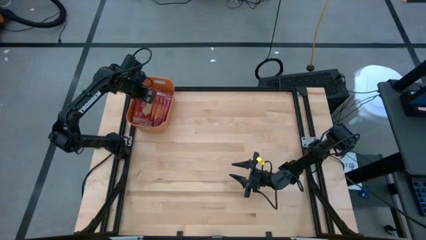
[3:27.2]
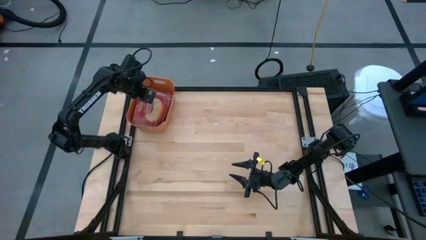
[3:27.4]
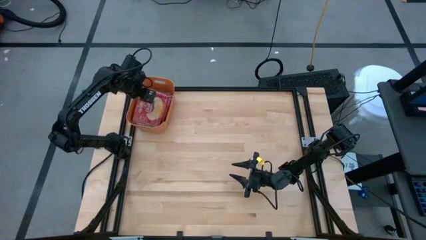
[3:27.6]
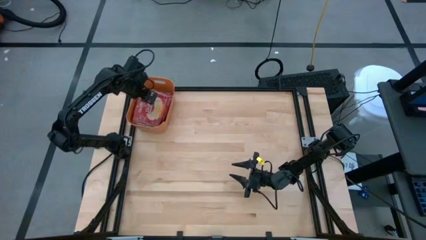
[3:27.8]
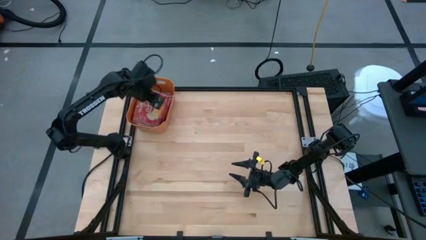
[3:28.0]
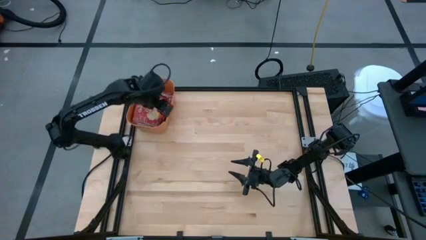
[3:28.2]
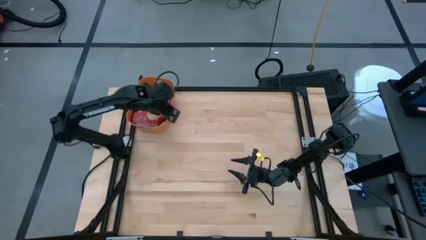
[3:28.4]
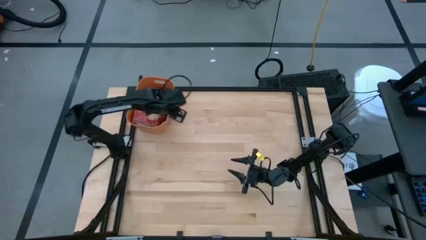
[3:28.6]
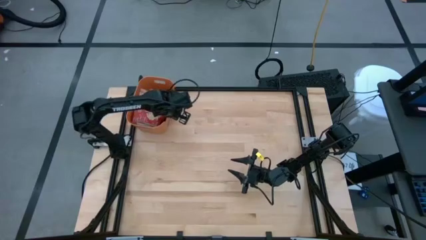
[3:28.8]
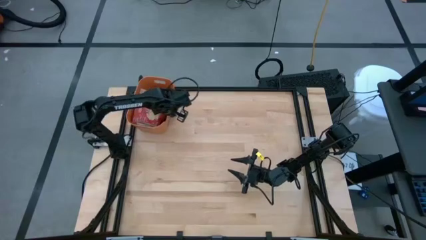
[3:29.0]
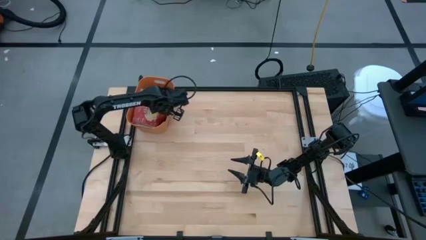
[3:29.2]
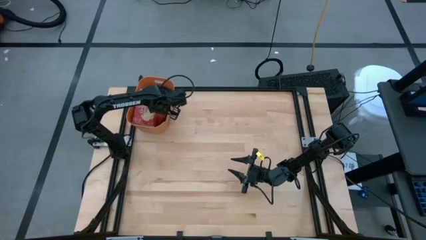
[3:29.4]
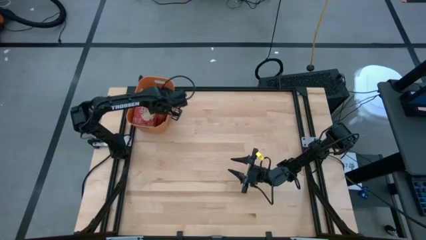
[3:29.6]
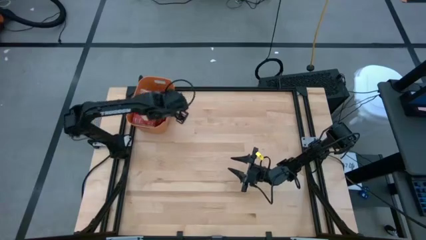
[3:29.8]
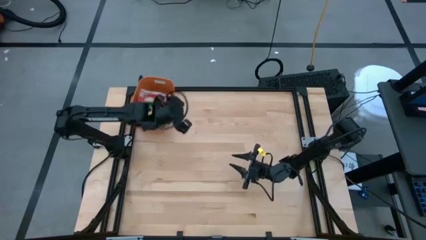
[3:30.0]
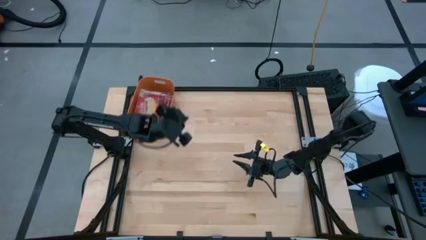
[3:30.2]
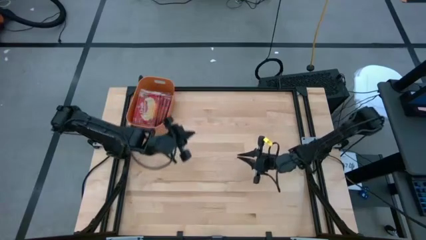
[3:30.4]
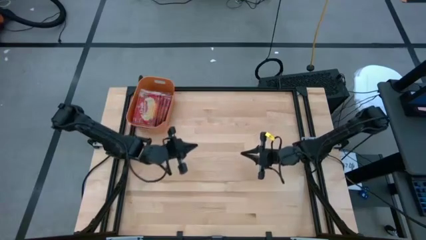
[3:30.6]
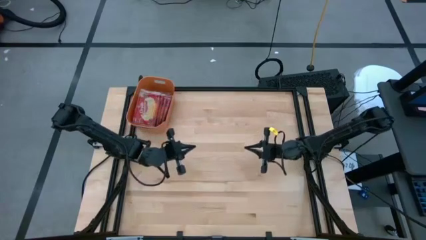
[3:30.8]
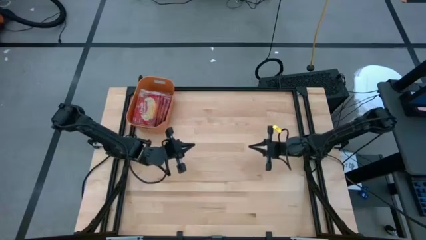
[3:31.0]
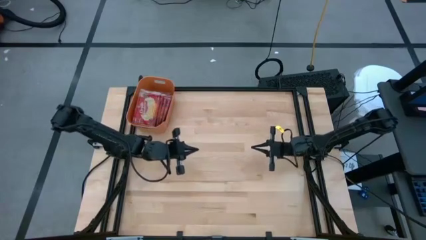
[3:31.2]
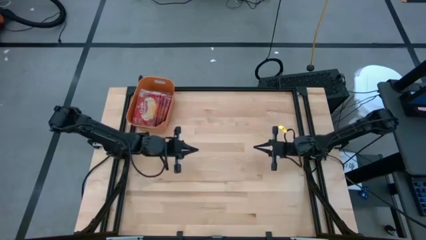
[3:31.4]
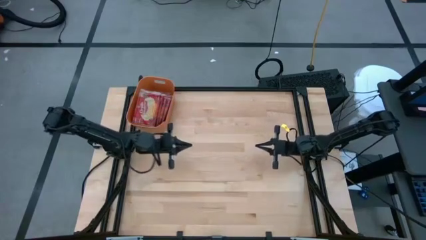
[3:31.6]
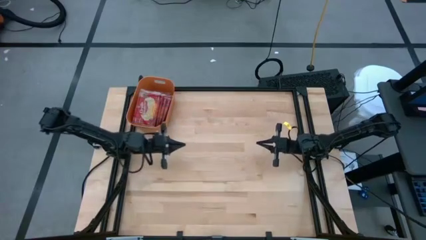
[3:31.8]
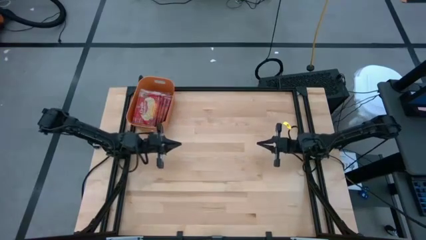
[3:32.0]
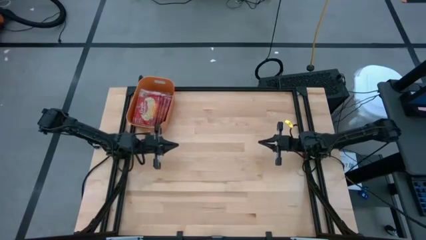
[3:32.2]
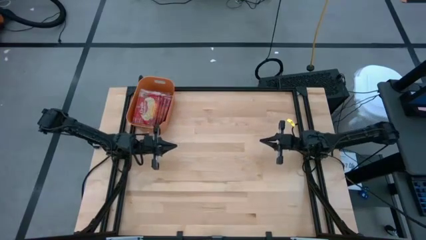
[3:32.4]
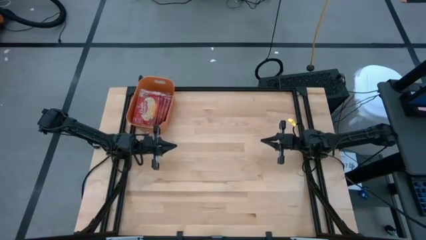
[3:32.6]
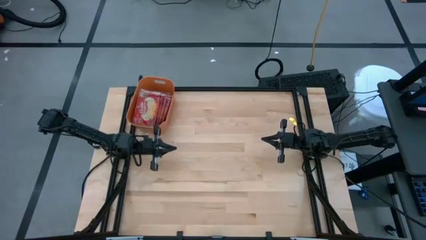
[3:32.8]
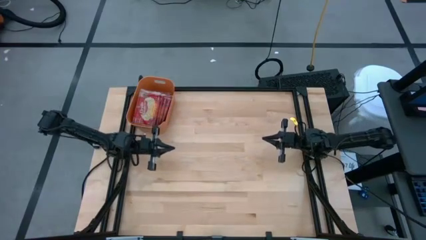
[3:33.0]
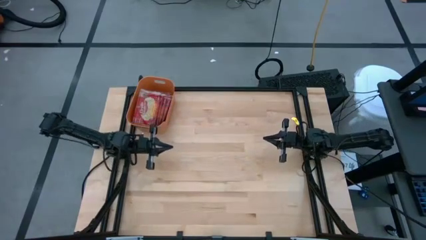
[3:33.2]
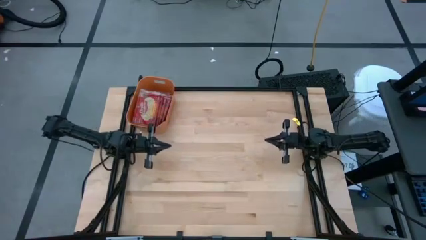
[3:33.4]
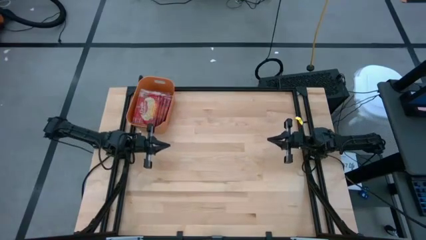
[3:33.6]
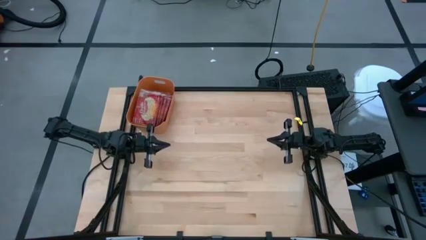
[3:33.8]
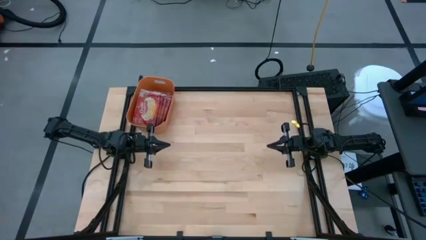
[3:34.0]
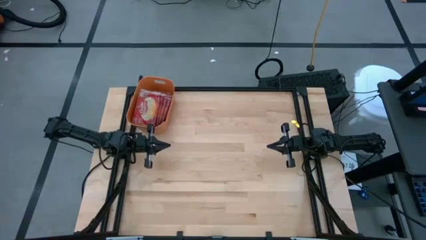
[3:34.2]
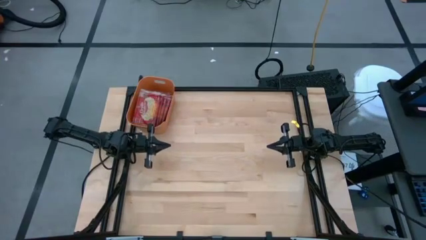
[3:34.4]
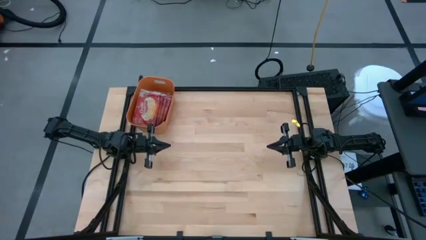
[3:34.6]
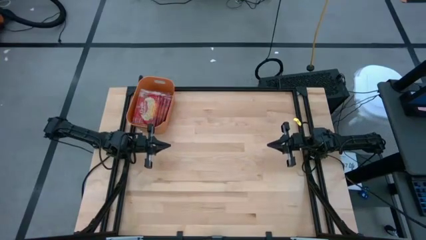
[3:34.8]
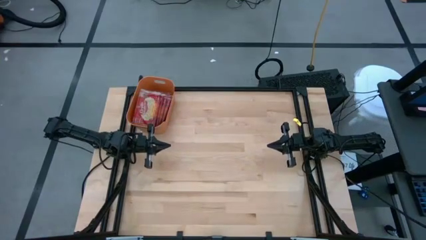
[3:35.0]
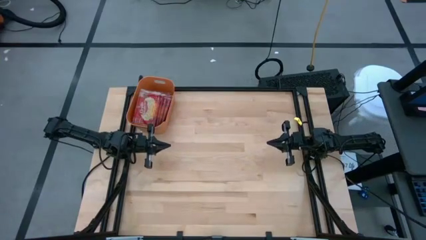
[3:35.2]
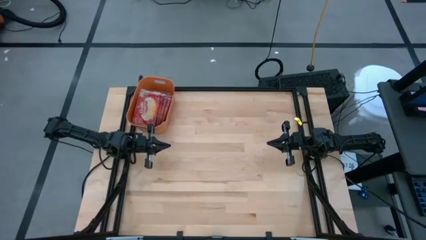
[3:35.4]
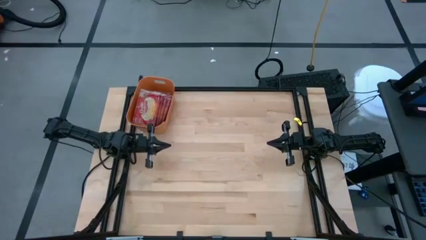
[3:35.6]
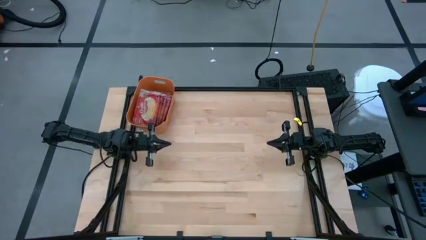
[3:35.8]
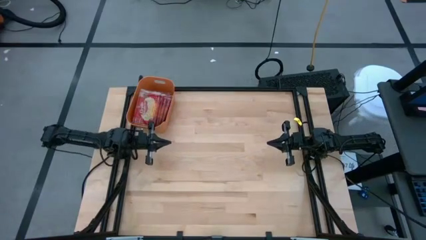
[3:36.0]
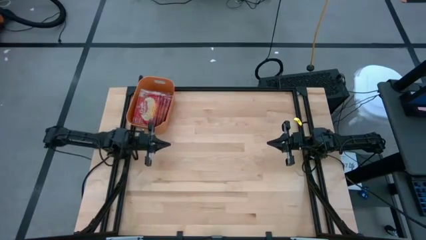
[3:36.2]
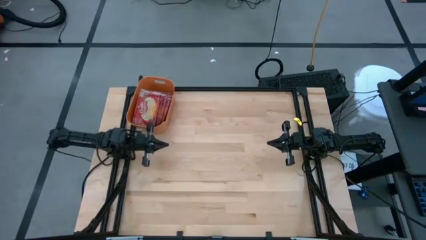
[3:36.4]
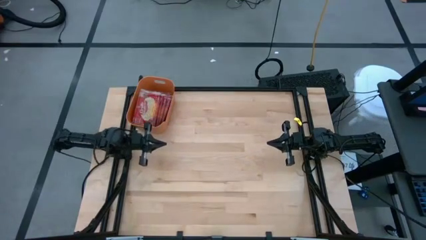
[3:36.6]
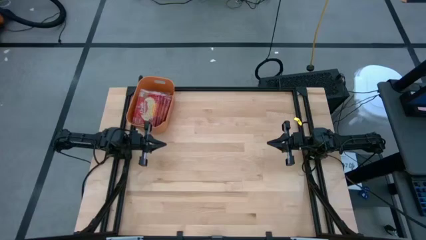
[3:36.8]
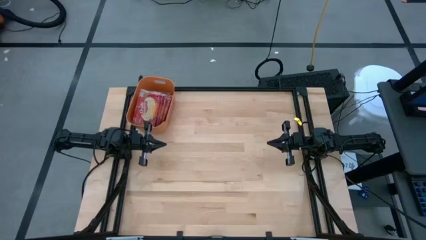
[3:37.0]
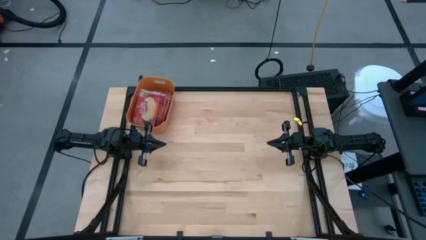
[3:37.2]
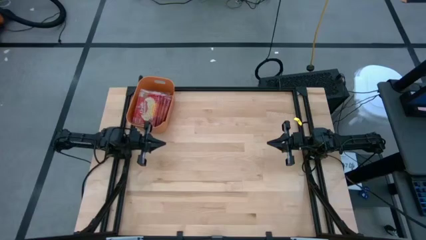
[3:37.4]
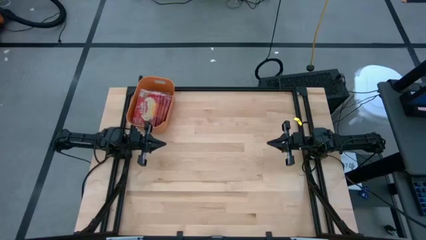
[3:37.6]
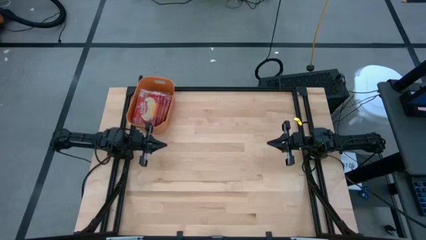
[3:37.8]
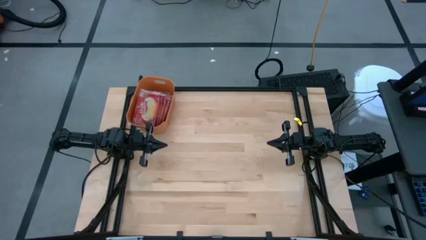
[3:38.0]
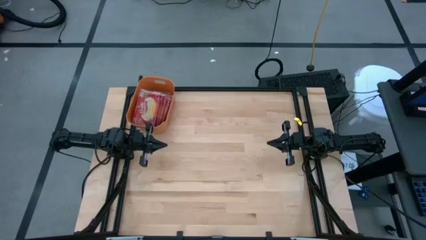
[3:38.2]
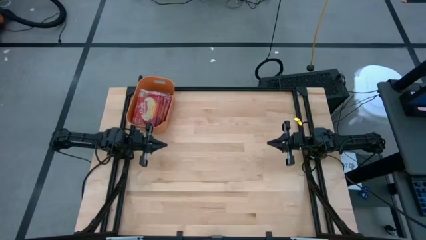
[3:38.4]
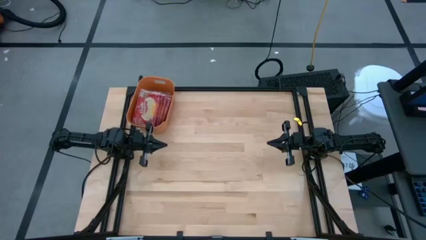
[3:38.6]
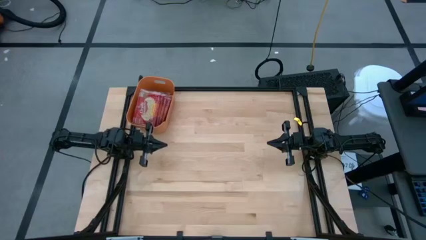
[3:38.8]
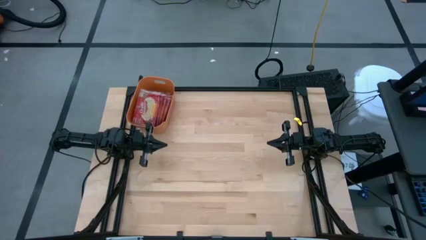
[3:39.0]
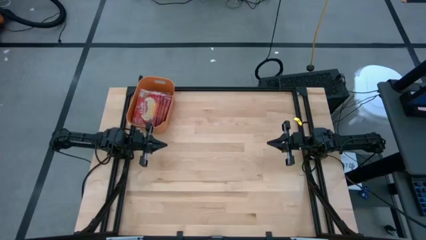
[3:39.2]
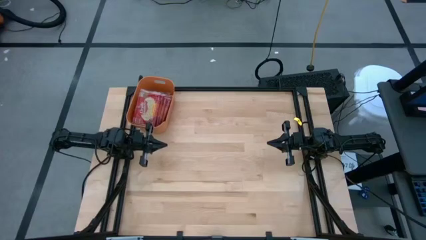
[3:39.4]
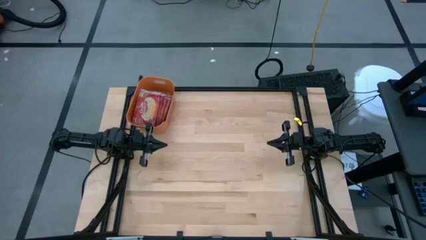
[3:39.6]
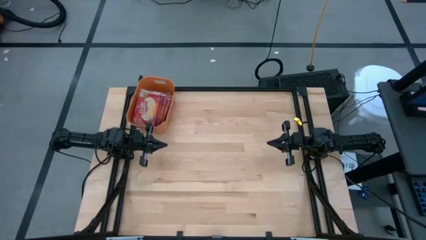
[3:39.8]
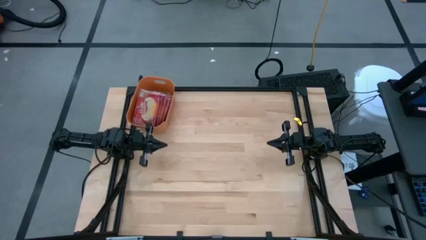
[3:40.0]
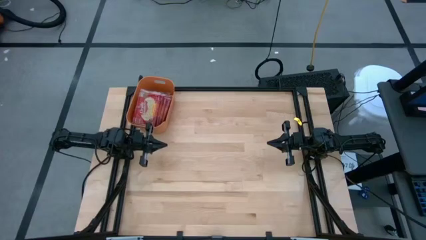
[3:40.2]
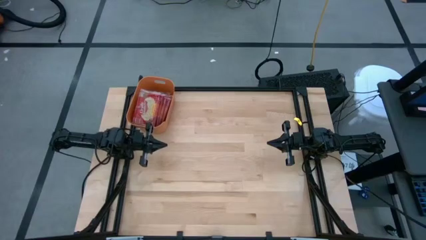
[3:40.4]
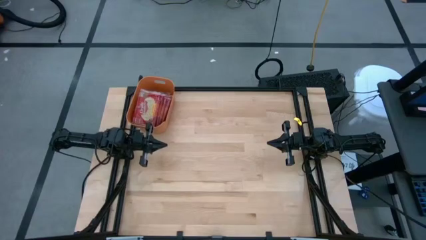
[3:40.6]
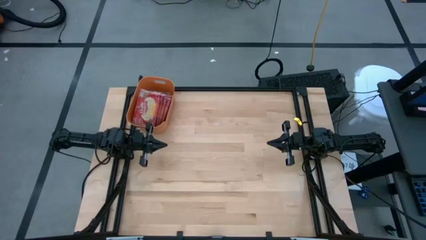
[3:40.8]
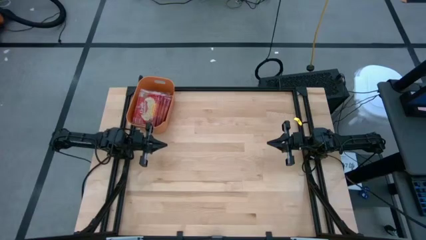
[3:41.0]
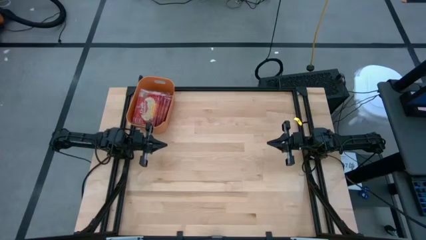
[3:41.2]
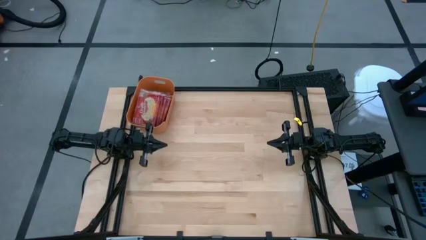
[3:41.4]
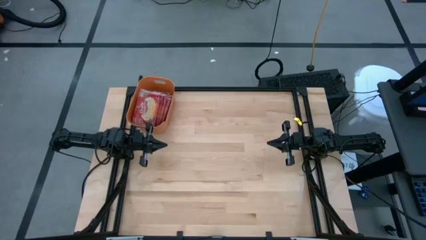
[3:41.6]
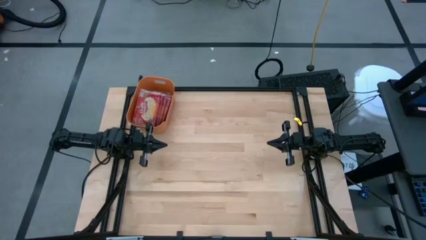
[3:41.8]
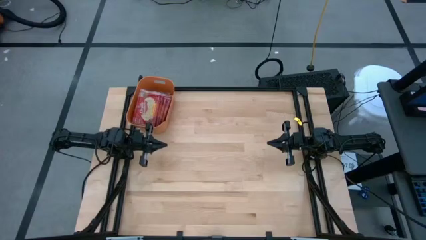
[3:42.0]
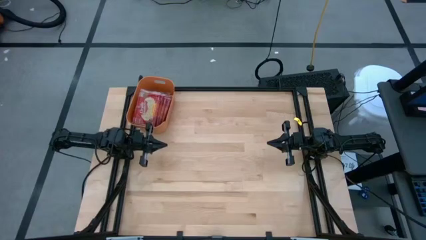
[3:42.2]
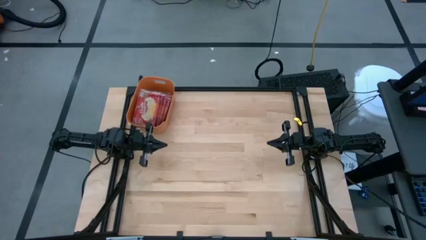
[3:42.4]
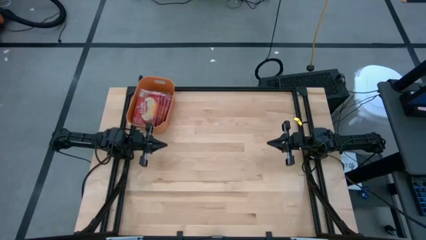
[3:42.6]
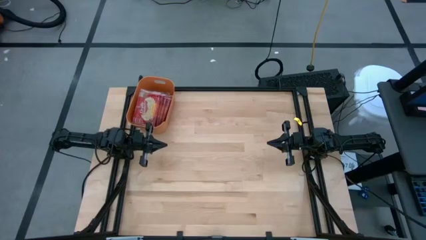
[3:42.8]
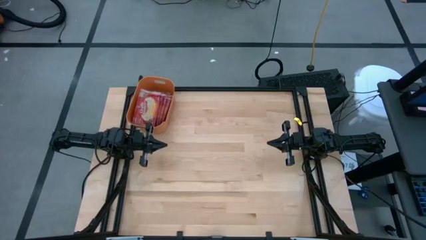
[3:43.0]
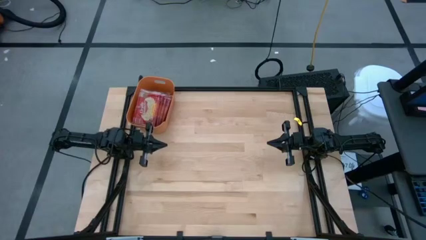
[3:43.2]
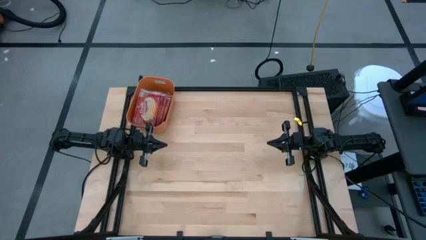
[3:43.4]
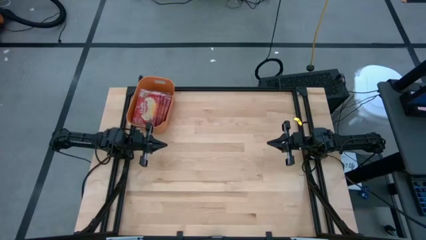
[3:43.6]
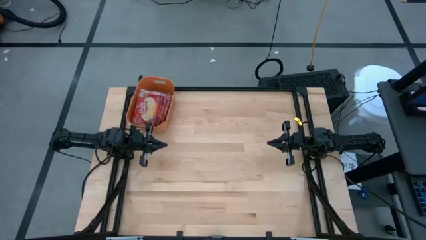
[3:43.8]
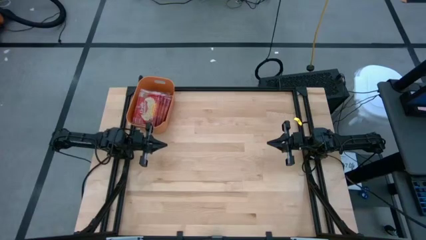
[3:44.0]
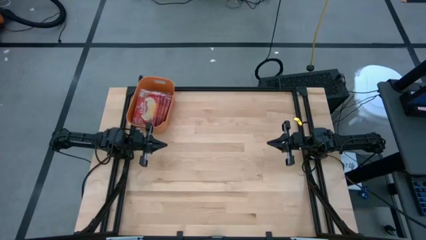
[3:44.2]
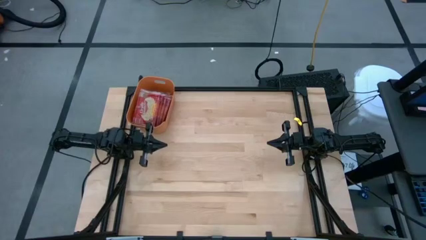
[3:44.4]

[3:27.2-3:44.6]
Task: Sort popcorn bags into baskets
Return to Home Position
